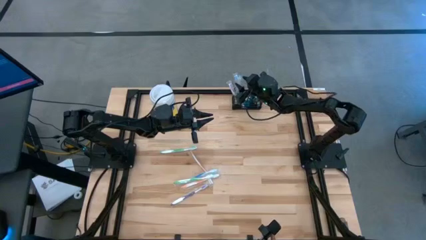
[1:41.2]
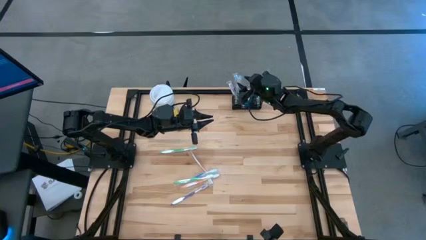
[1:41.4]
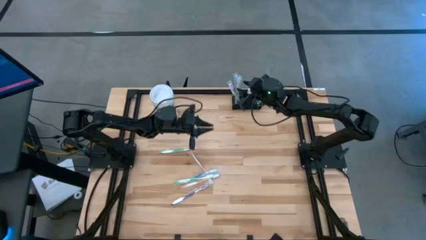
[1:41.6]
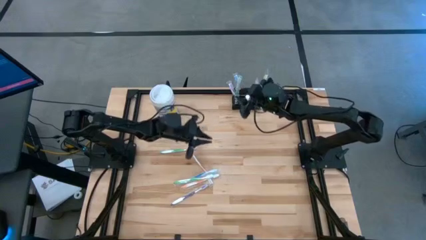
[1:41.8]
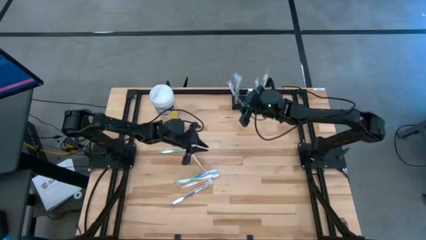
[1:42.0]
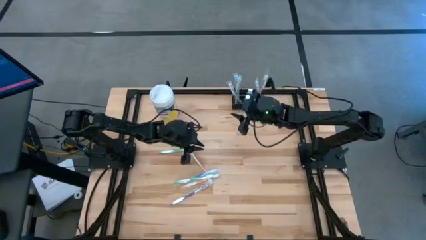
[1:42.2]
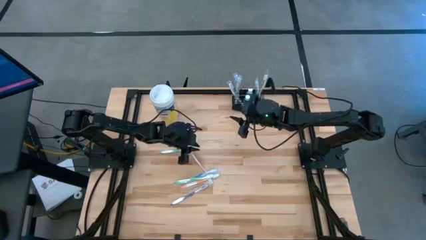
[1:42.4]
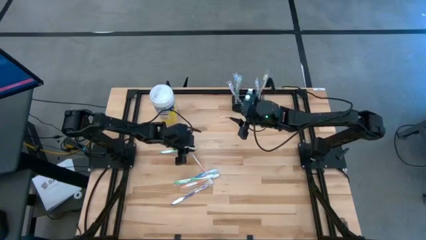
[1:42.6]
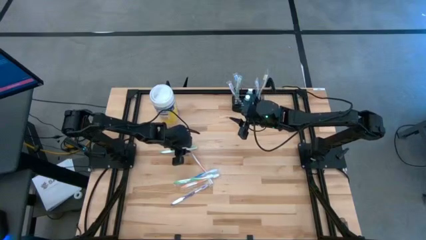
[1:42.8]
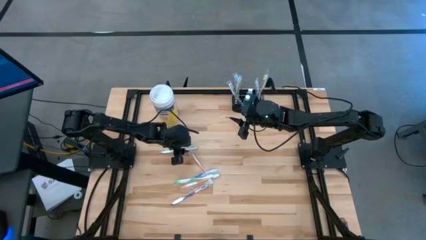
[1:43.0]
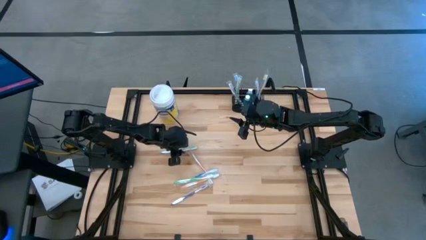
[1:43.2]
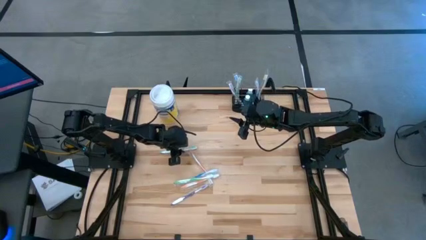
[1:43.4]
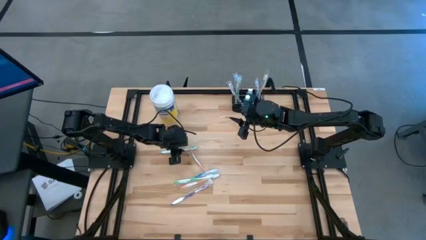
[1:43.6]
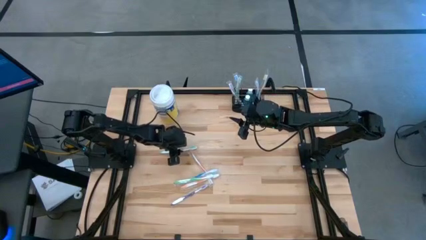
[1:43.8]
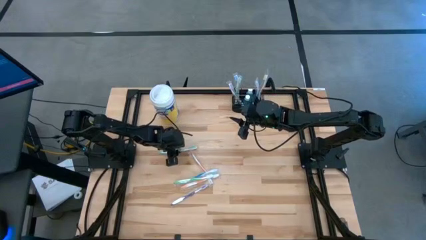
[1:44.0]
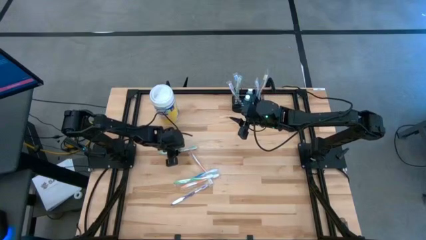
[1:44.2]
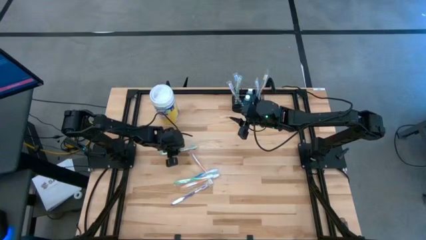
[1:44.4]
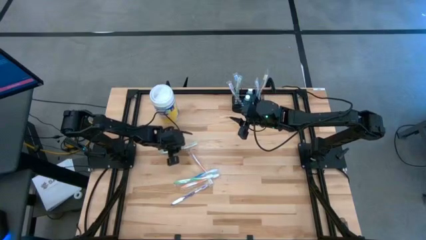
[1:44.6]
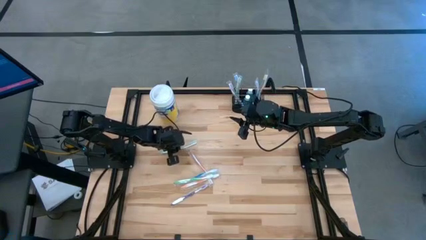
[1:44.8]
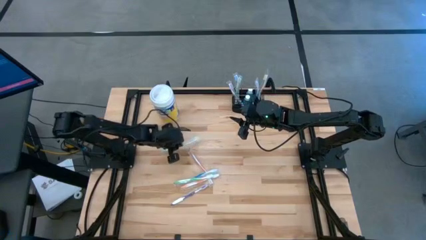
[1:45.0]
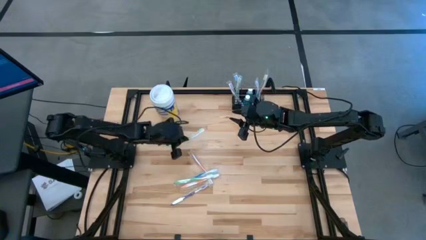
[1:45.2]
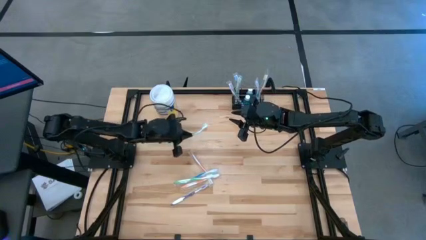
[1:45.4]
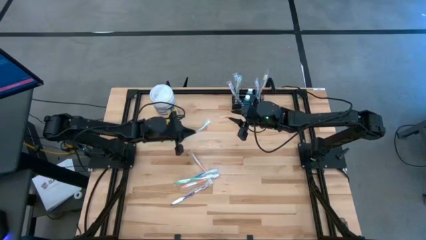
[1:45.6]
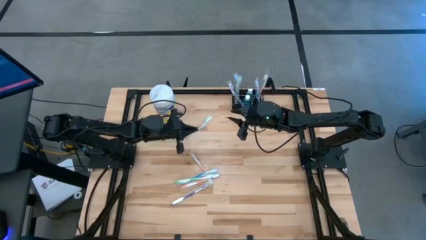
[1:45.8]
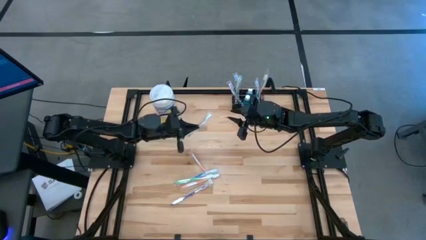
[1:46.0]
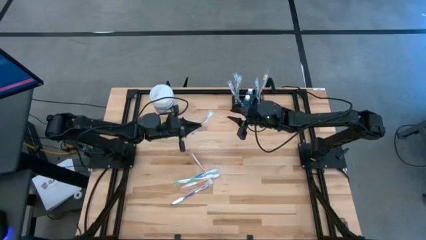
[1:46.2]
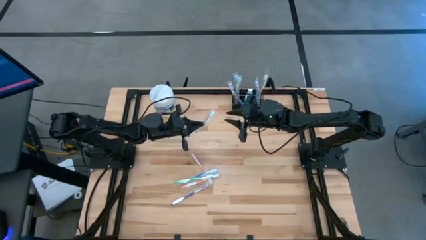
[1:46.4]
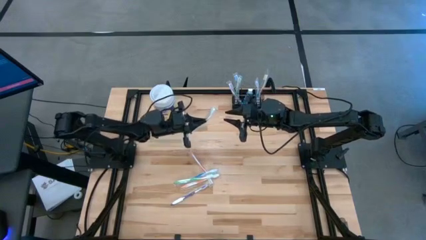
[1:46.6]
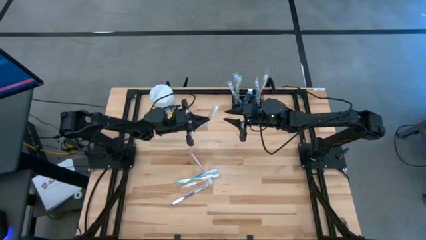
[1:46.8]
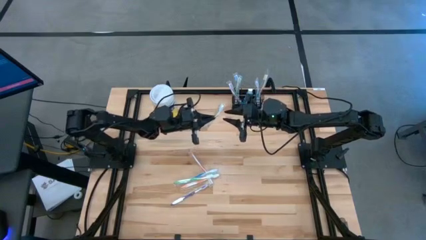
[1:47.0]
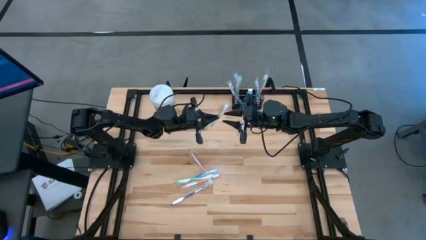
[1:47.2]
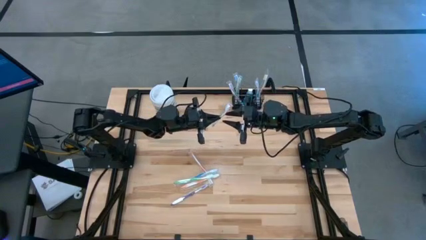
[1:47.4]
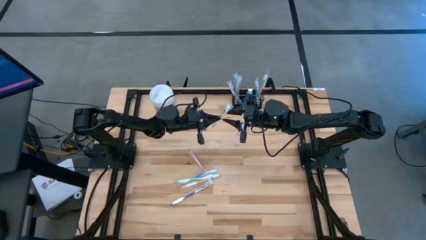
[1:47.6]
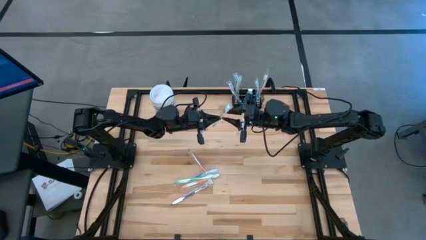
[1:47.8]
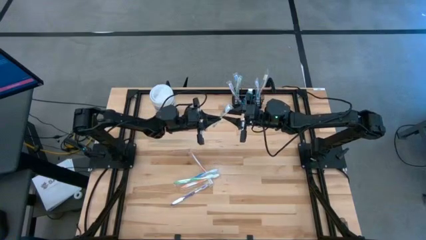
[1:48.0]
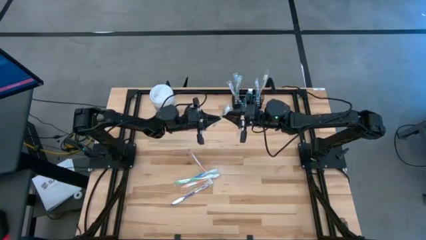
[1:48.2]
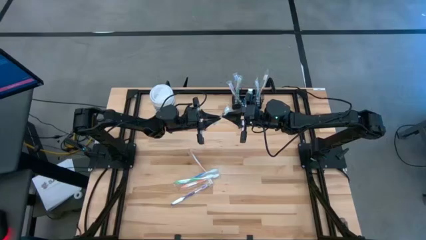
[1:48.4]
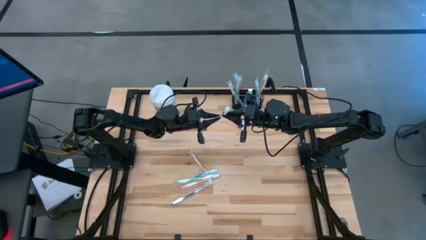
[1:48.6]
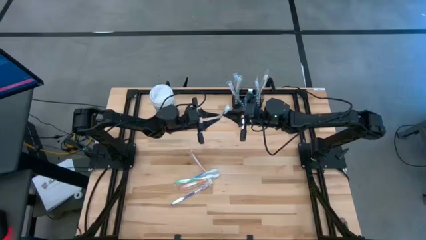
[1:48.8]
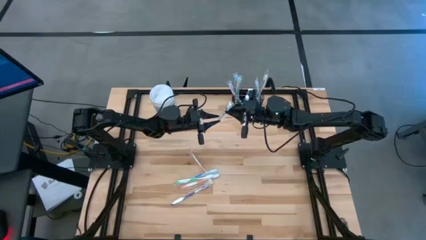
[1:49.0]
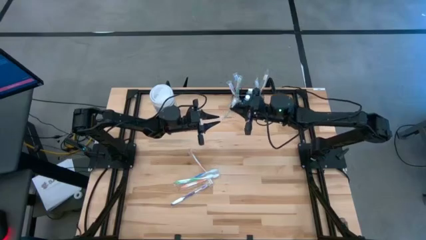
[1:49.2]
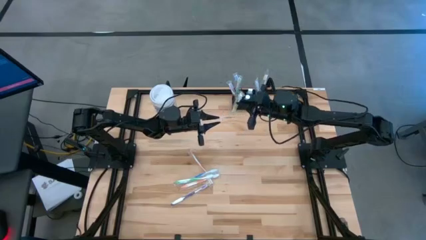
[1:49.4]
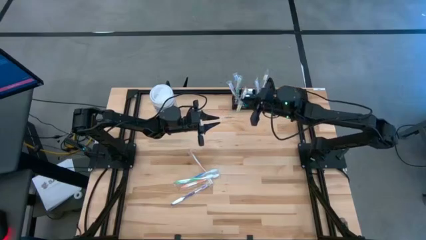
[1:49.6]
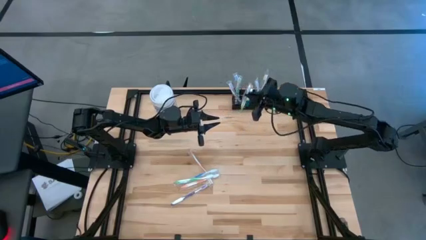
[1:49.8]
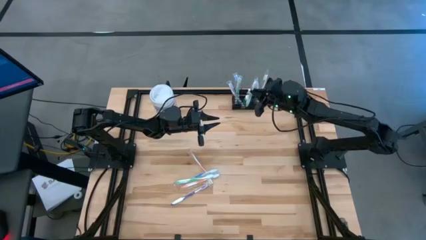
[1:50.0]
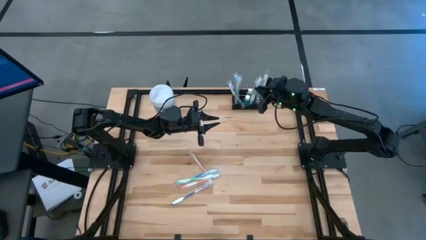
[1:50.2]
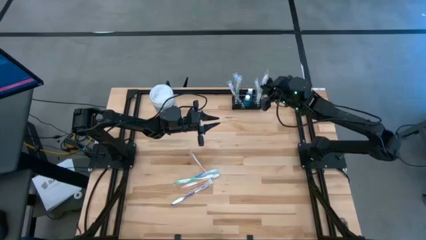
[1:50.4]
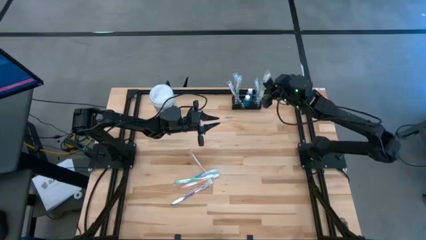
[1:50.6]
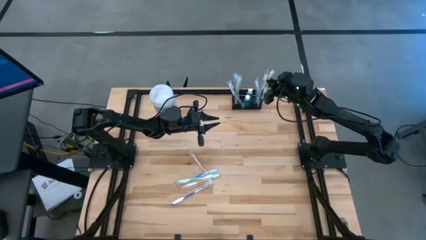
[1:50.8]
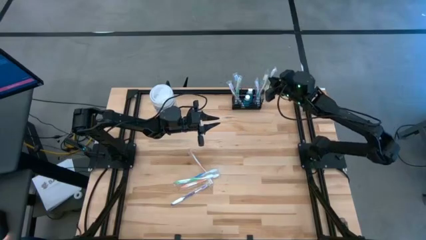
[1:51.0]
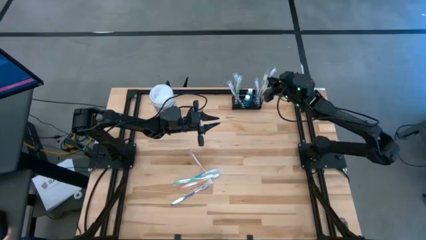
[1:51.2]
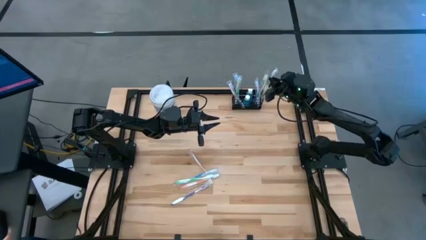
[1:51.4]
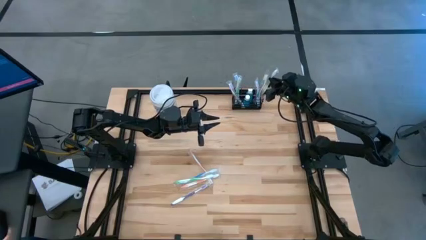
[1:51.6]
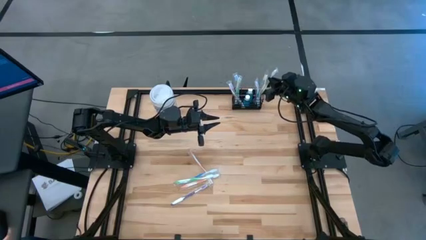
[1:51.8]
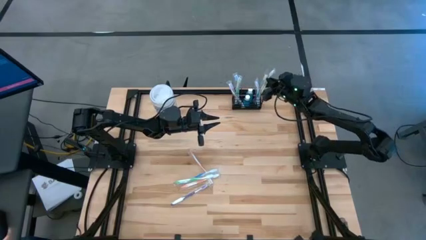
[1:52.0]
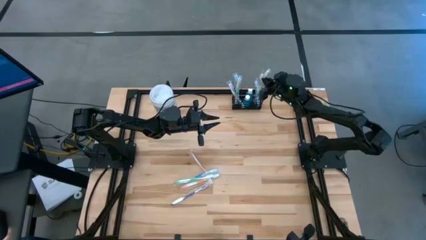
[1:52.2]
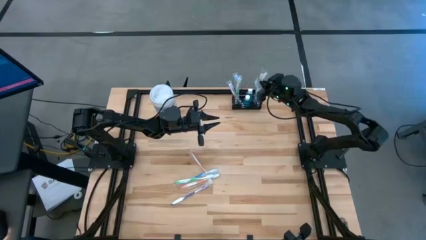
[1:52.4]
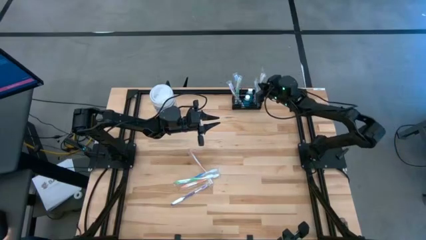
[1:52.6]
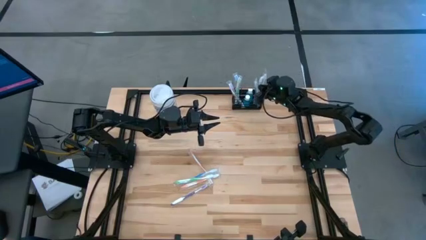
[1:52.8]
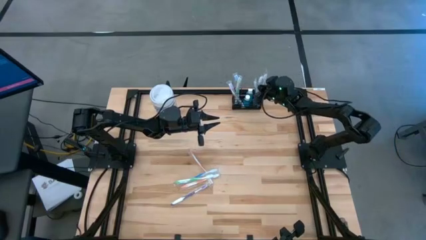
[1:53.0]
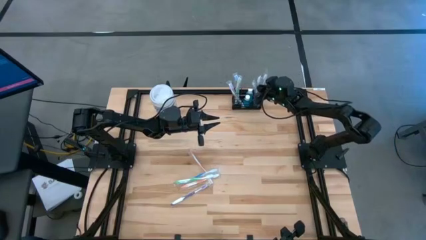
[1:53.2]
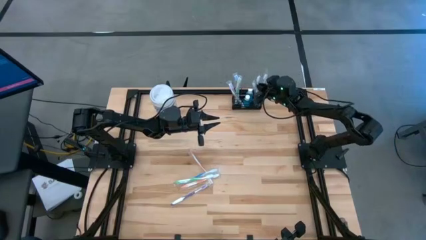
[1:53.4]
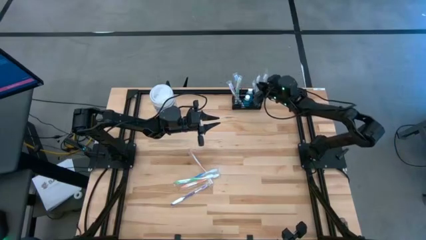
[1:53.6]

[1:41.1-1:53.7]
Task: Pick & Place toothbrushing station
Put the green toothbrush into the black mesh organizer

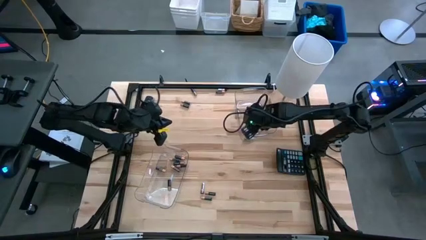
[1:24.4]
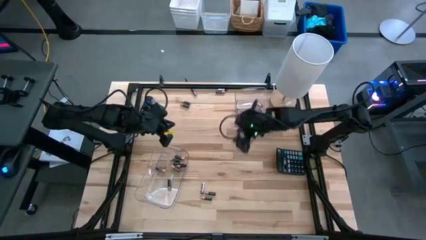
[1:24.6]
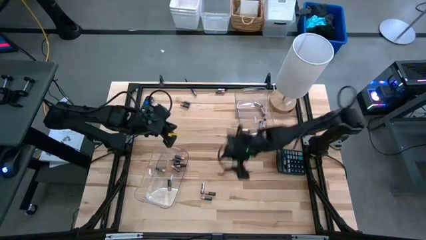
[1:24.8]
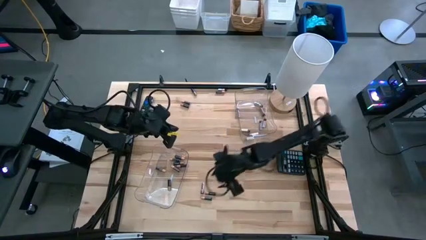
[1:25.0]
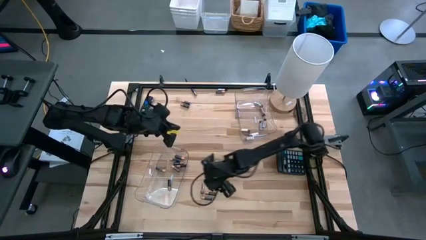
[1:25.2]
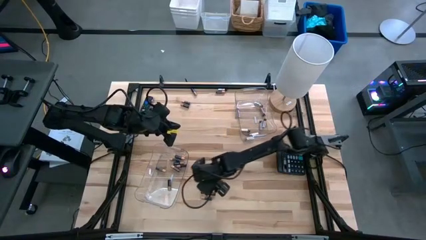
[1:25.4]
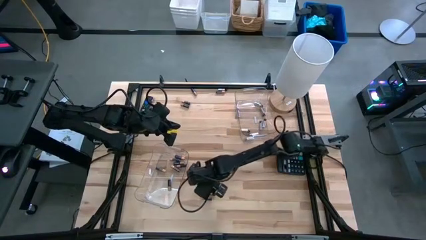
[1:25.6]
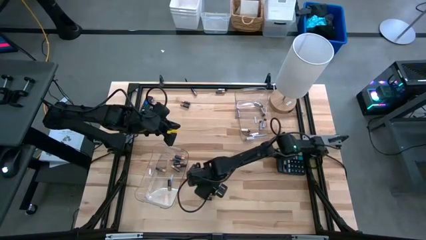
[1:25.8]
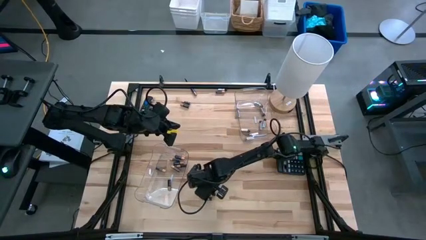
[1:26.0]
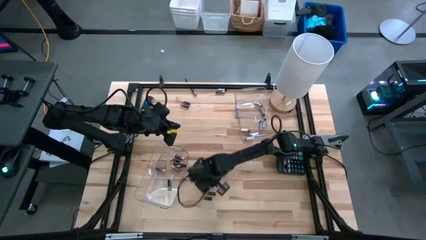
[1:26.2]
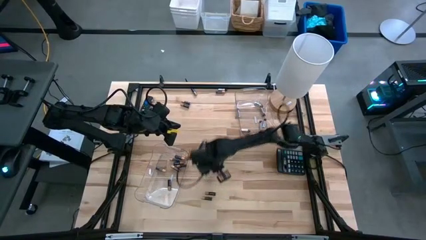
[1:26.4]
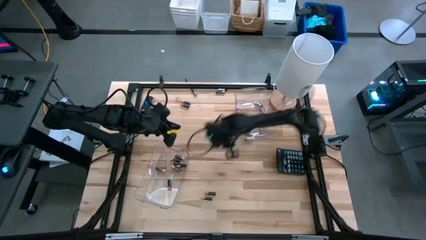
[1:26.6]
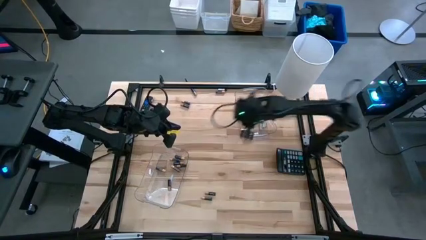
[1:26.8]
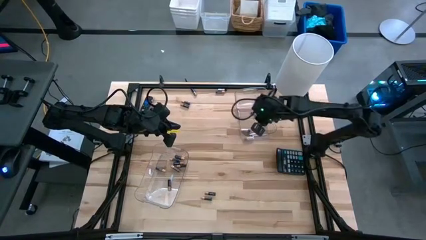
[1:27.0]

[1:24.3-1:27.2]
Task: Sort batteries
Put the silver battery into the right transparent bin

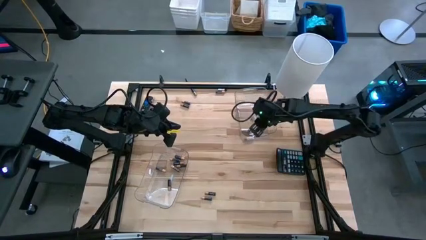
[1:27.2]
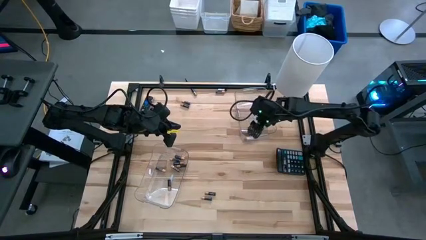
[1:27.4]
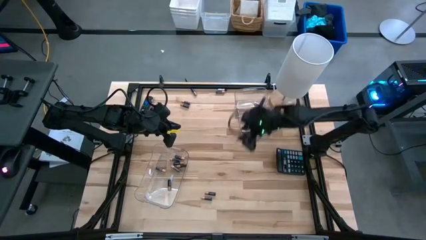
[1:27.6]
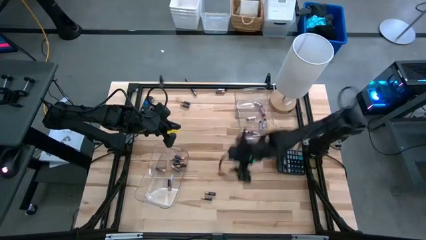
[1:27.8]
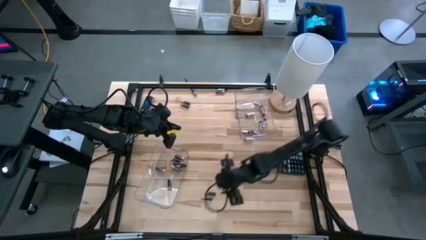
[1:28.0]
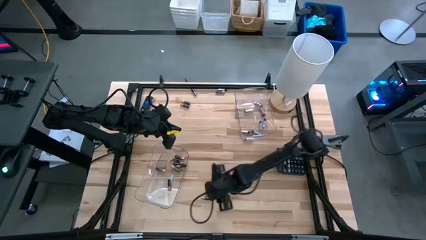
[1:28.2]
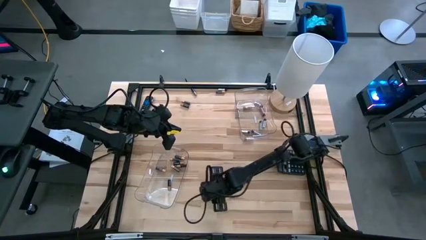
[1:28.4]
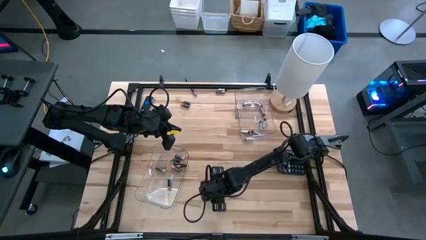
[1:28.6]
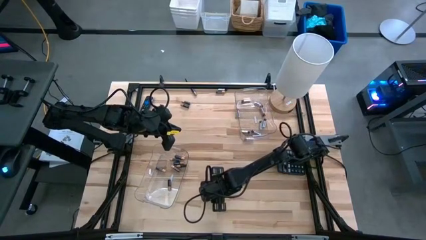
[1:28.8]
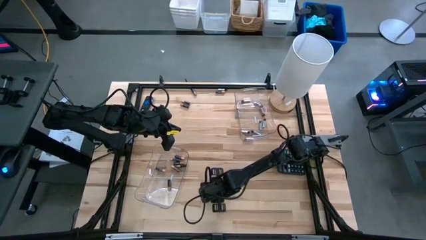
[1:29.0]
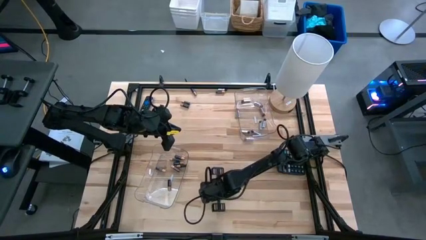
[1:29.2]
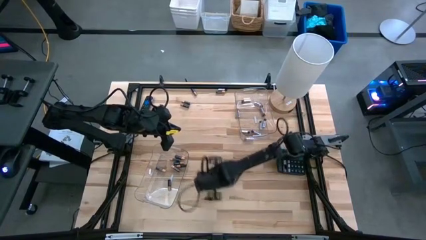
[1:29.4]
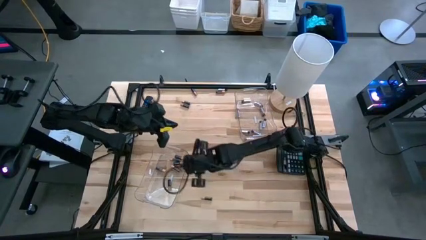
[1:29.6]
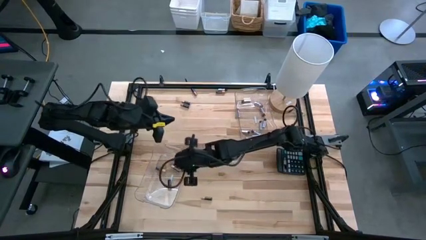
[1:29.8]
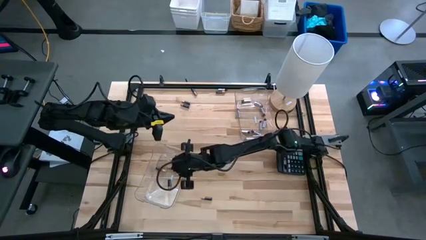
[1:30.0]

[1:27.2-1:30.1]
Put the brown battery into the left transparent bin
